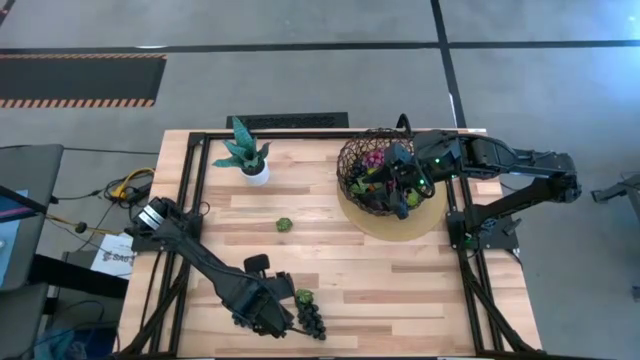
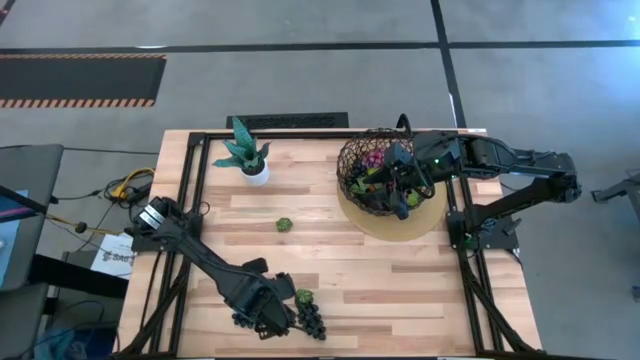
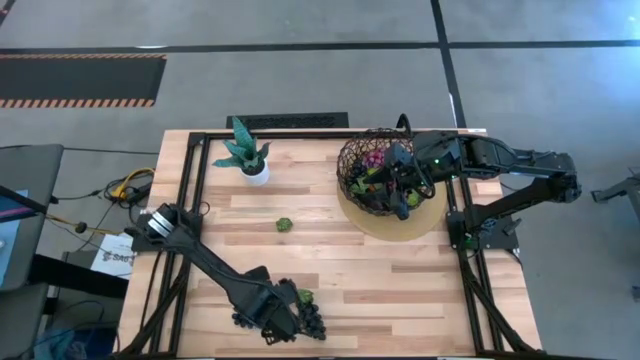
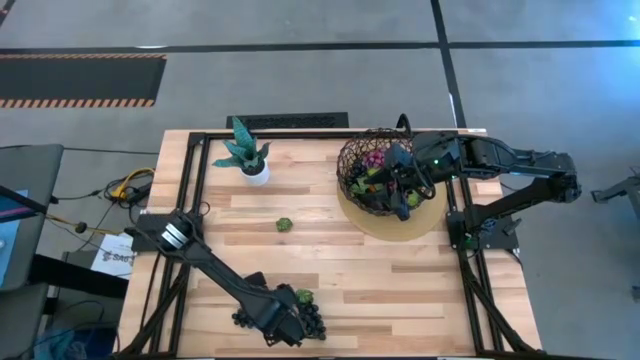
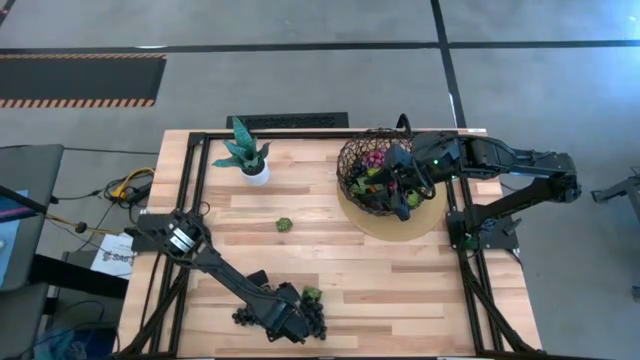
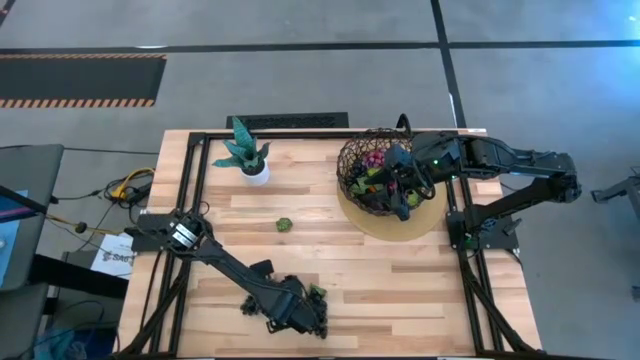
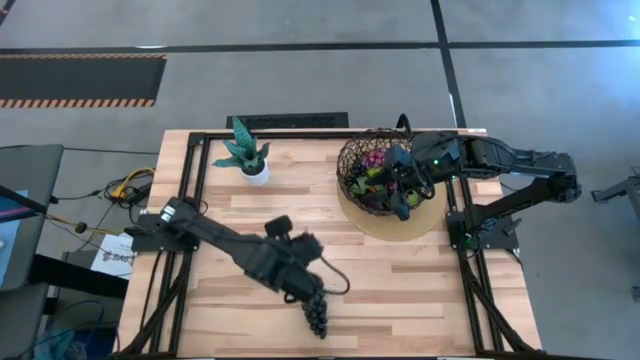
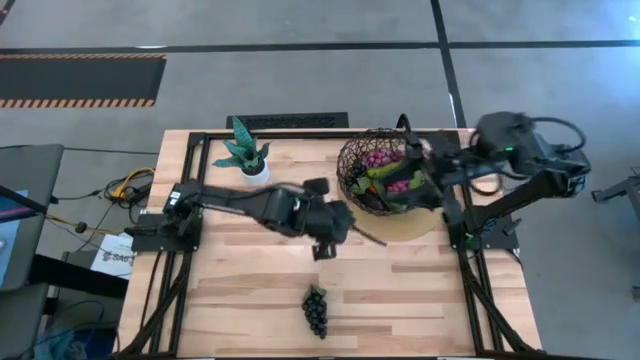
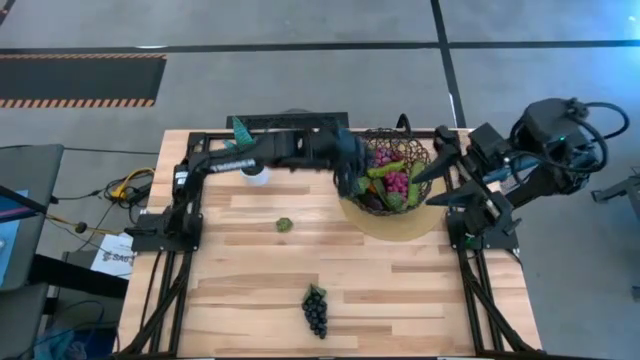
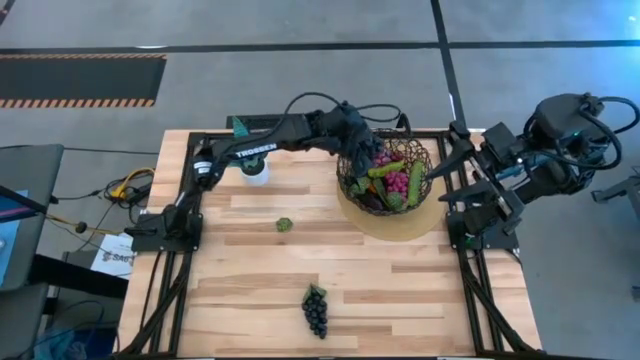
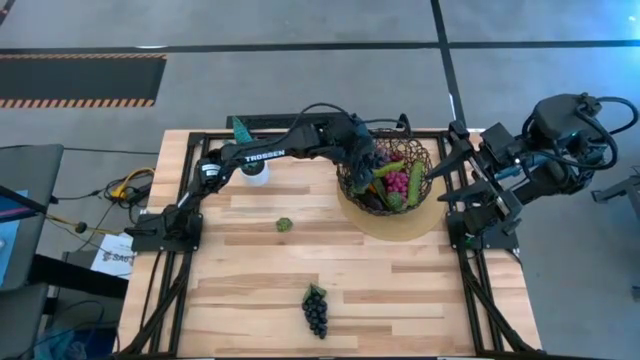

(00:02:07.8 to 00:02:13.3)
Task: Build produce basket
Put the black grapes into the black wire basket

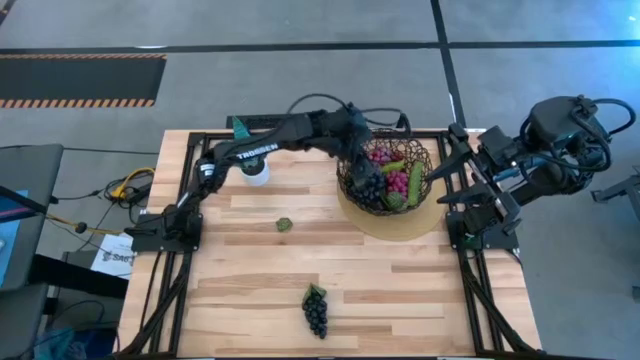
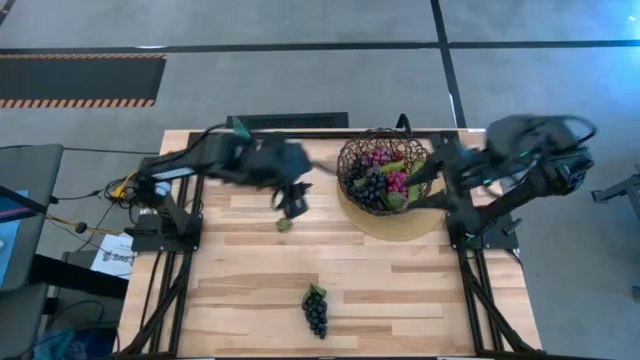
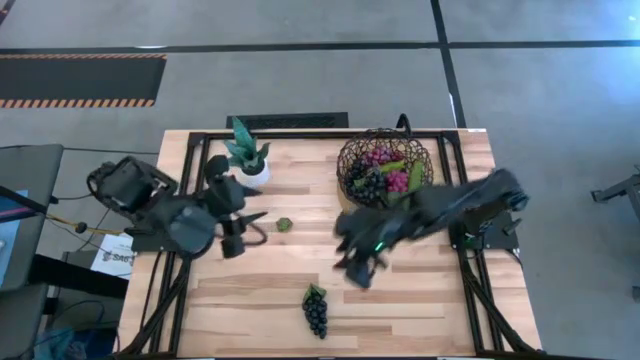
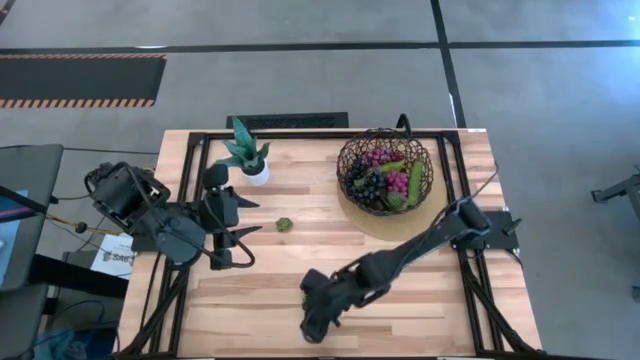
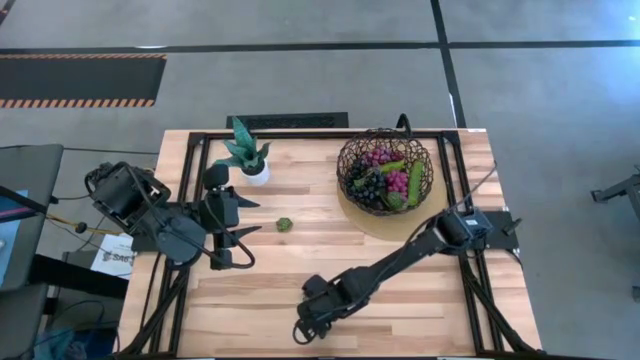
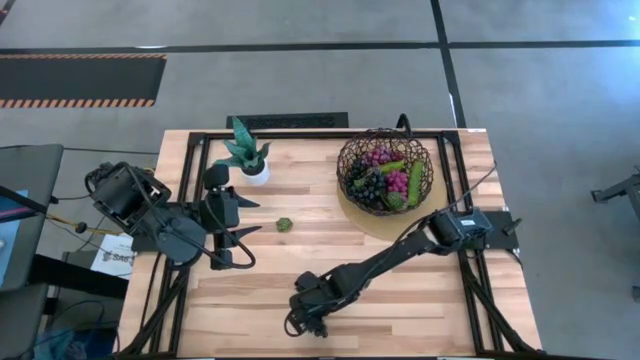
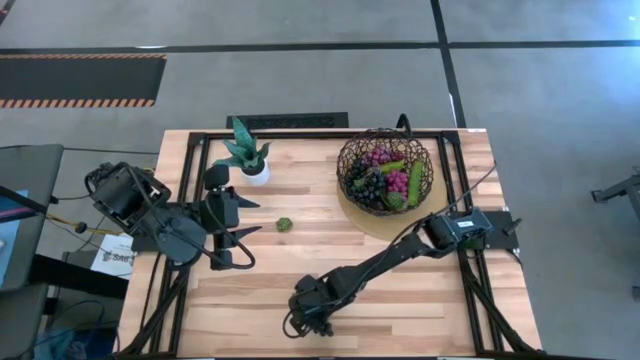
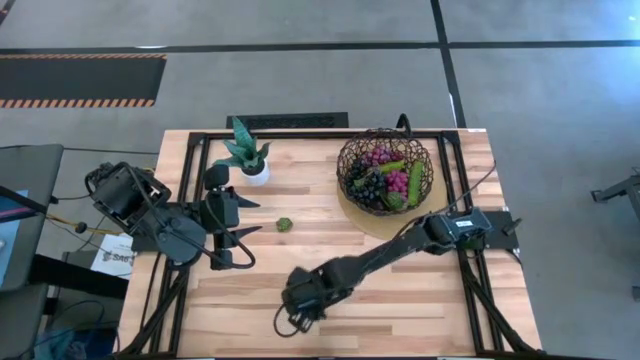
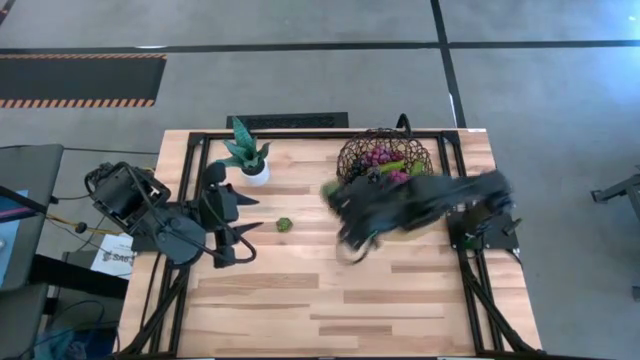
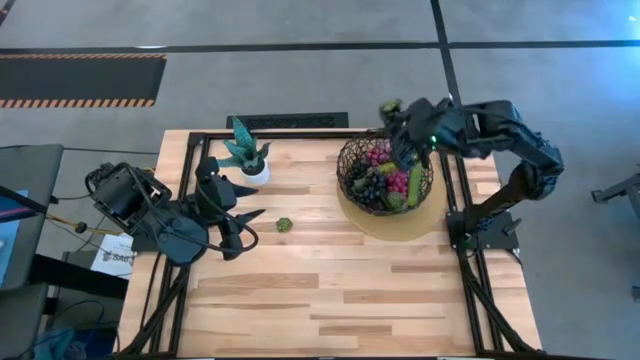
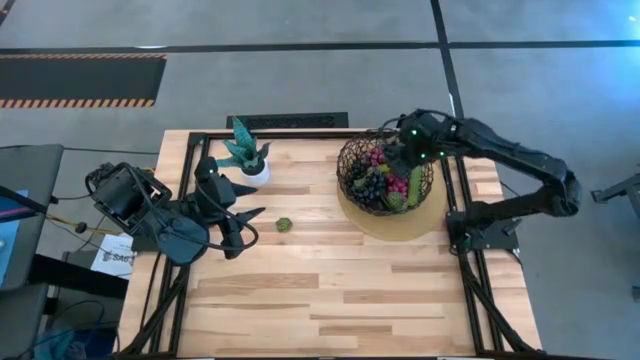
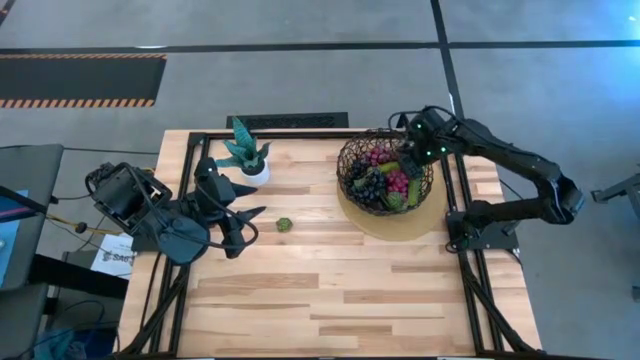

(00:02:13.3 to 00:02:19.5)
Put the black grapes into the black wire basket

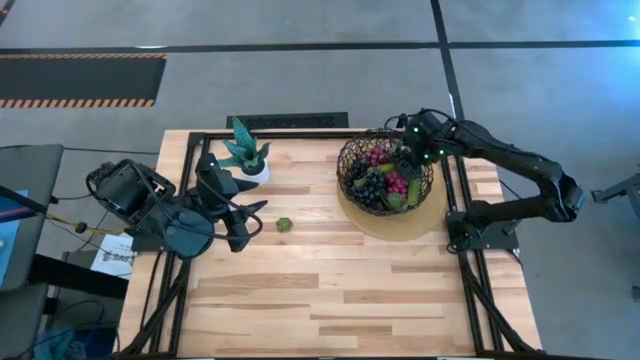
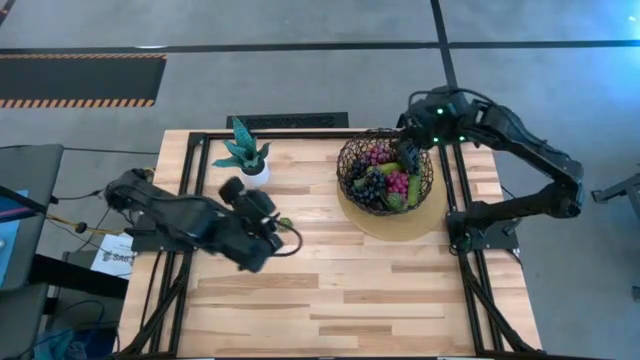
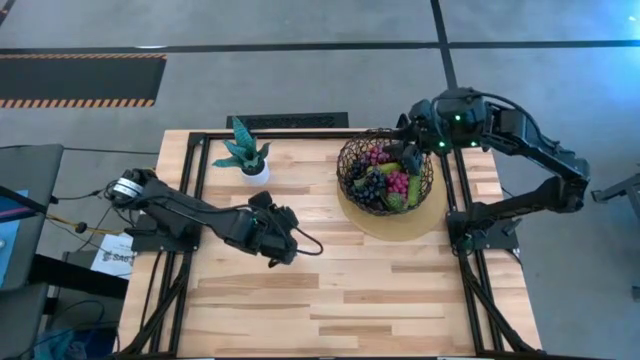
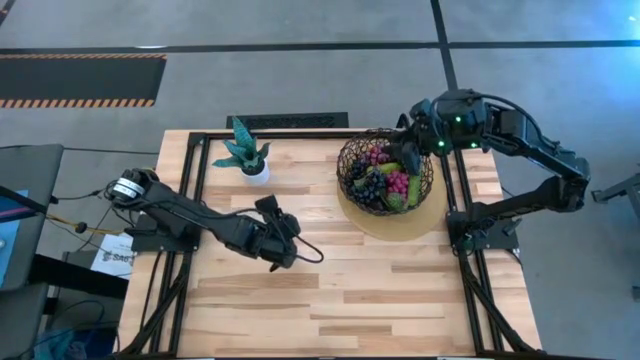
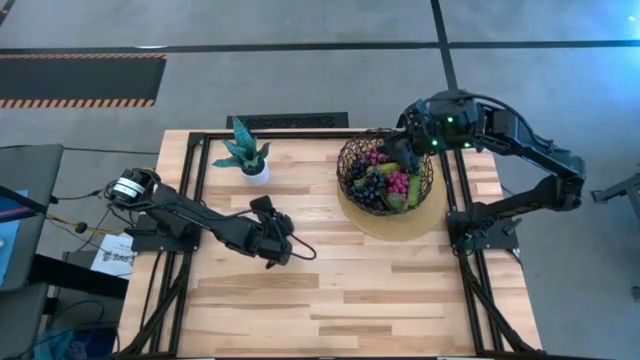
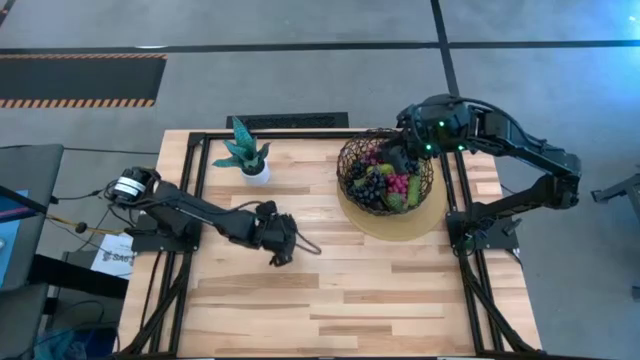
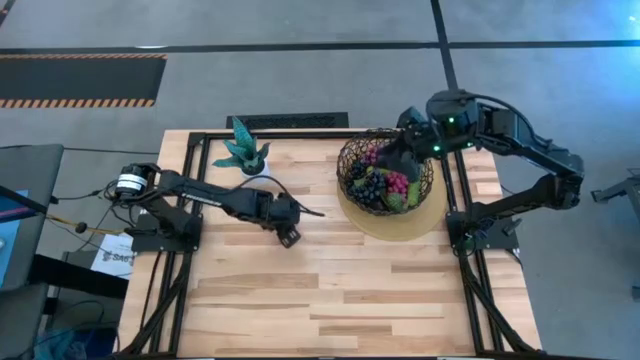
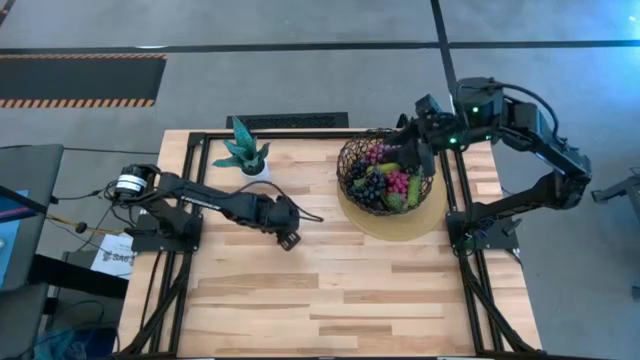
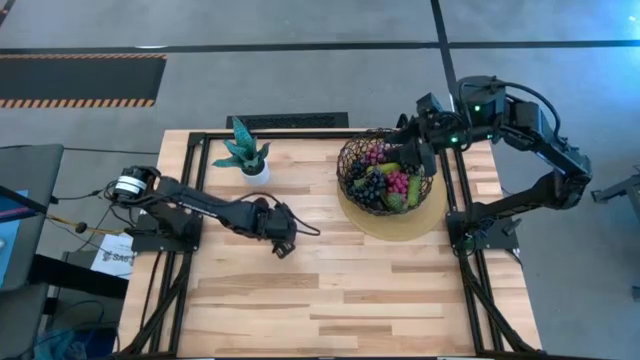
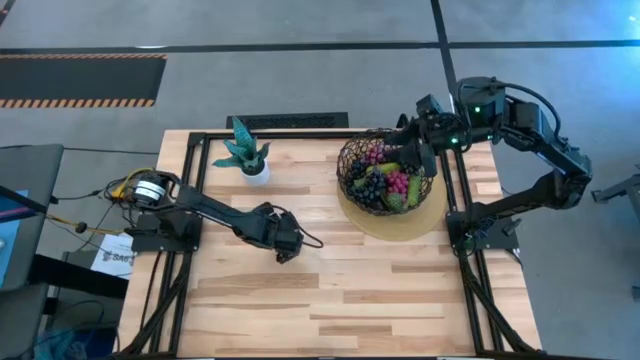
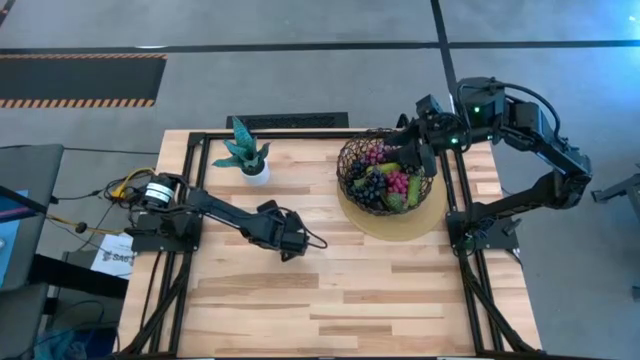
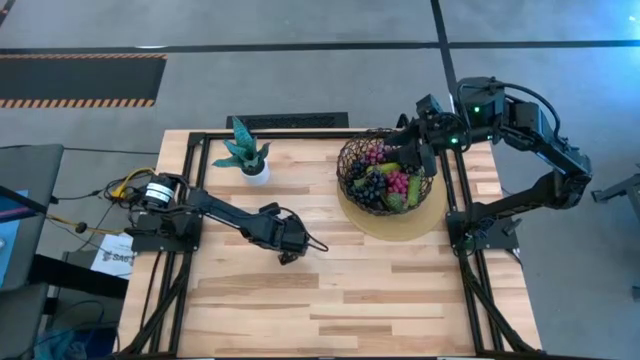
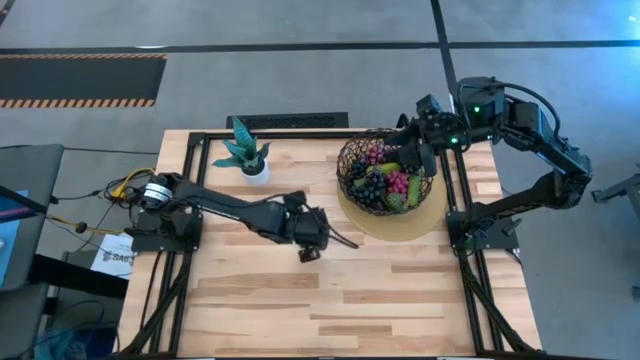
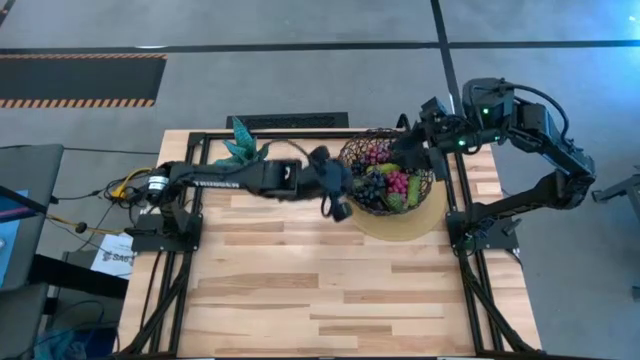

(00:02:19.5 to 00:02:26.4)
Put the green leaf into the black wire basket
